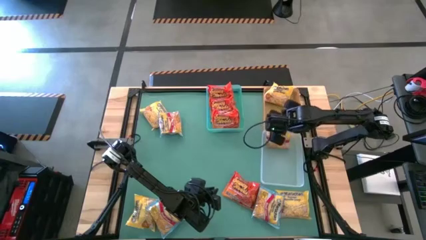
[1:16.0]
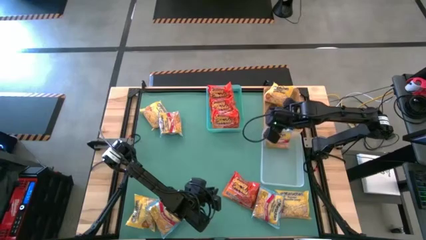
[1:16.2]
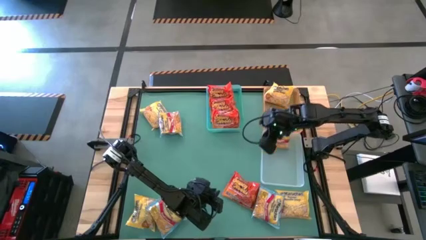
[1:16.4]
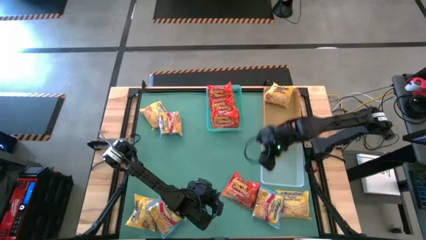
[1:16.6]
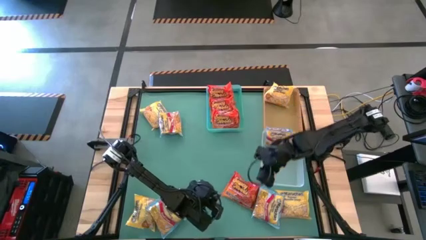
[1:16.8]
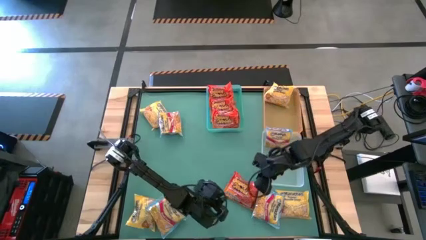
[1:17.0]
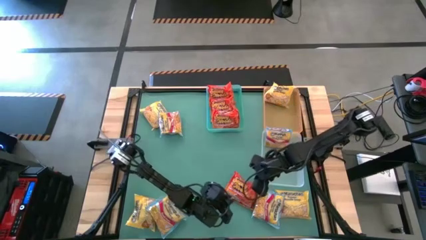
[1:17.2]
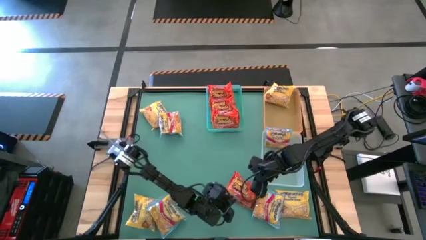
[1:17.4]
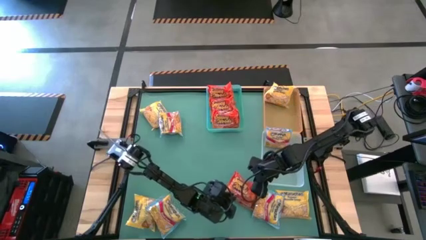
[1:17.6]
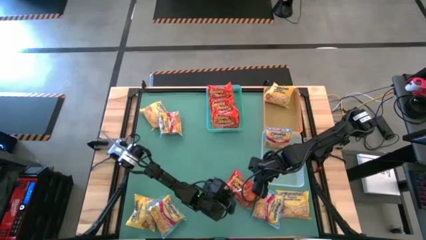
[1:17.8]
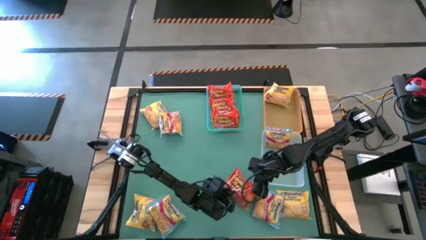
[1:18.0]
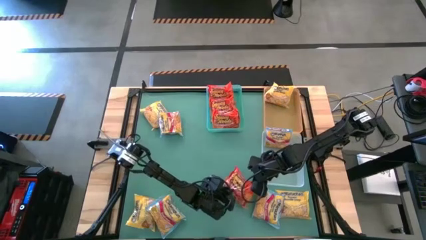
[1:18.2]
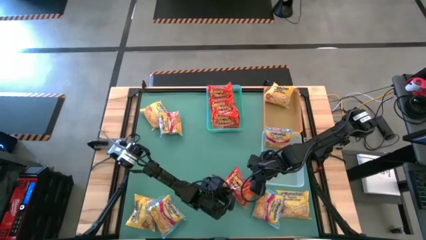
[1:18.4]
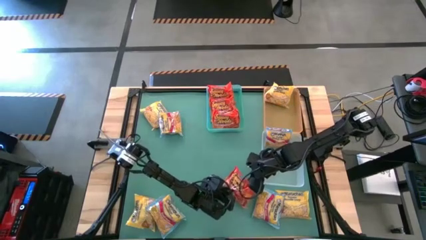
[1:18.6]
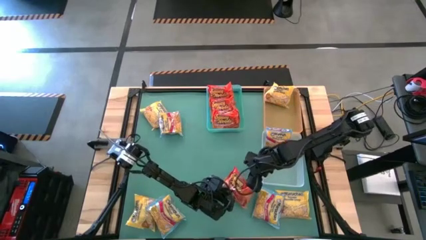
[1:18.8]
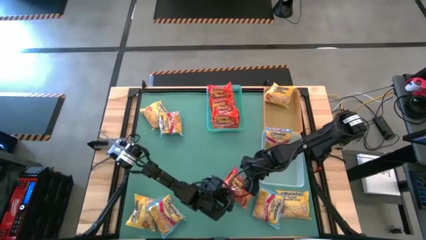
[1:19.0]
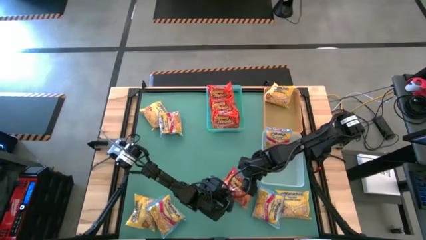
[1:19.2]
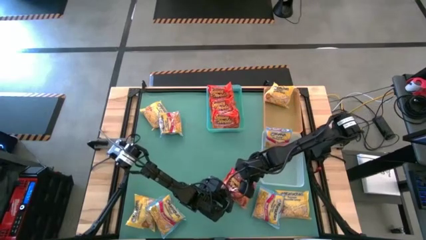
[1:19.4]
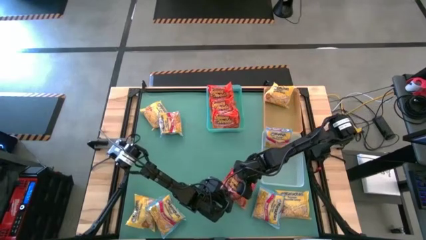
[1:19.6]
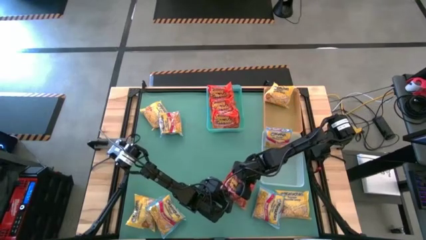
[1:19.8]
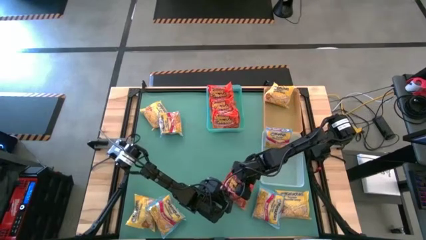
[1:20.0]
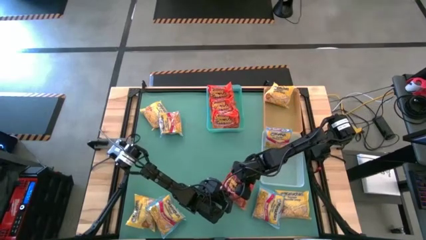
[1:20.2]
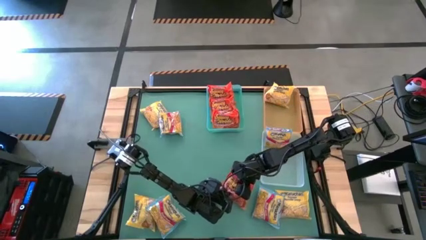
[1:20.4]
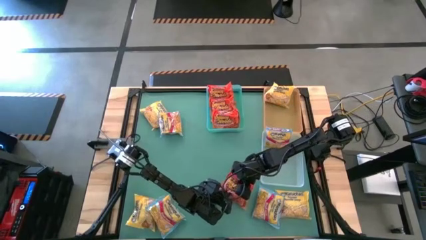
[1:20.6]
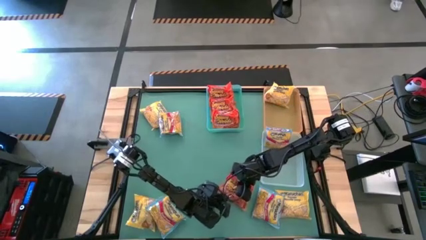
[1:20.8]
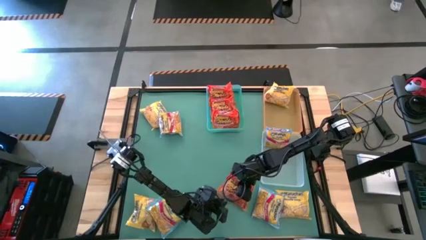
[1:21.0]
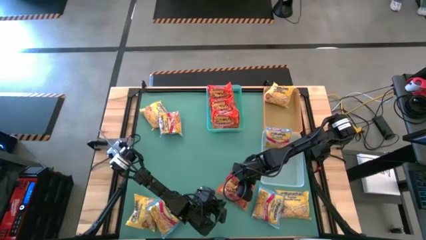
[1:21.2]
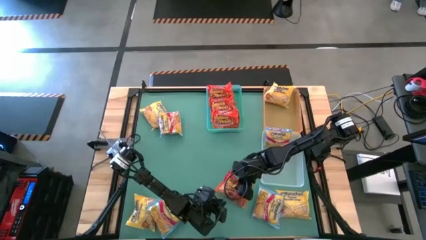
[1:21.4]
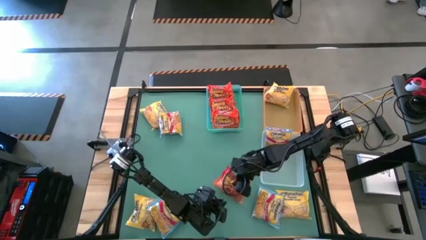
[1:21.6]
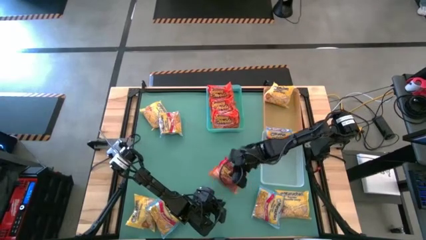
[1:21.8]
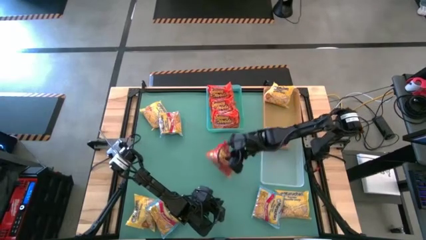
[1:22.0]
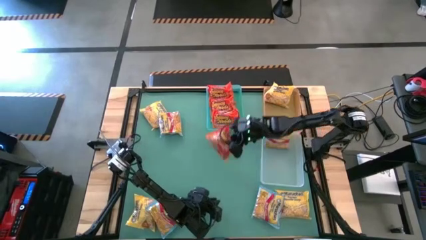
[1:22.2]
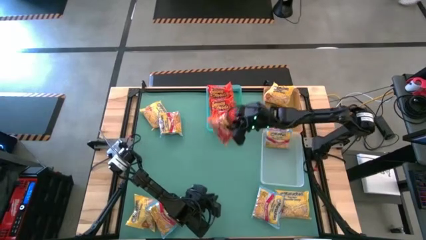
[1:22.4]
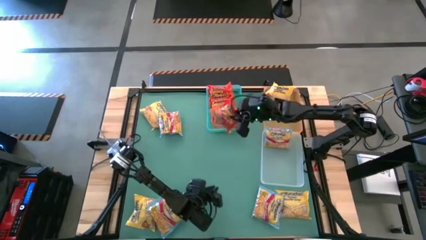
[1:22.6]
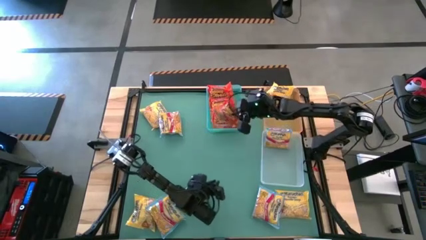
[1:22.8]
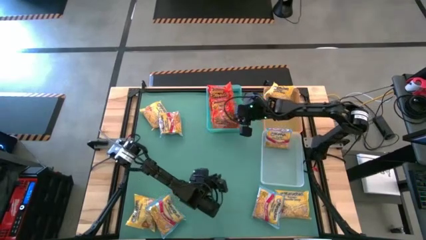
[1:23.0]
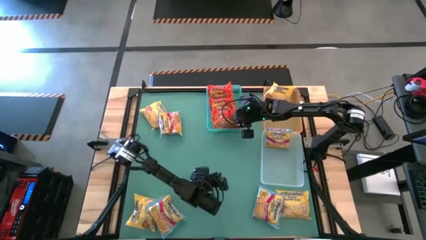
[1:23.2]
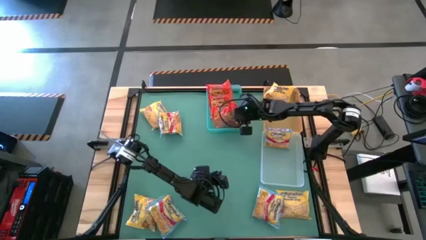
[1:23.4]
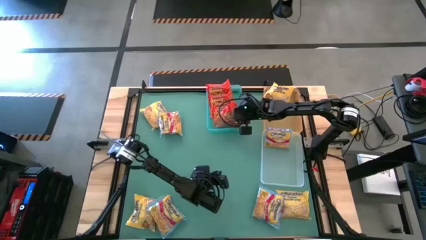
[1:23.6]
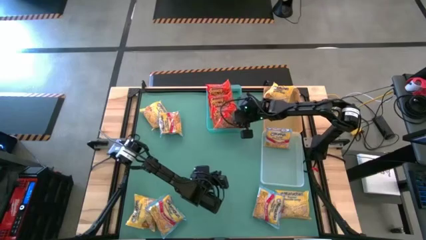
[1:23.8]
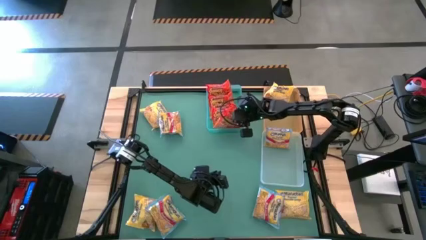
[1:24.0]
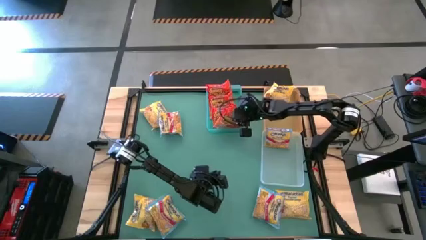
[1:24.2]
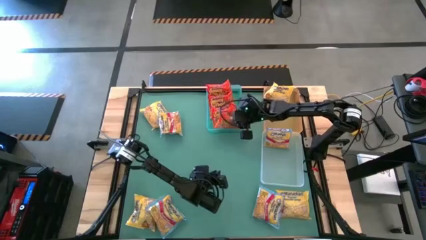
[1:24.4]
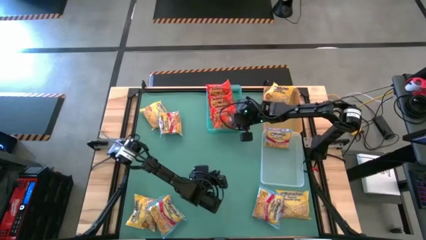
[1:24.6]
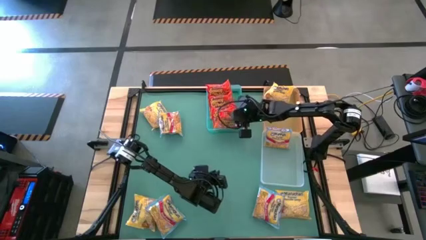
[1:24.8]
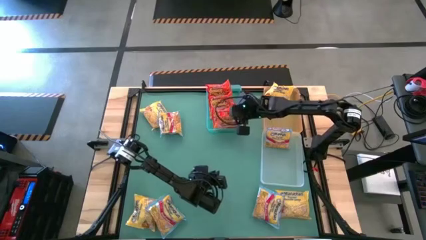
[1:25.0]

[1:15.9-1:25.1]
Task: Sort Maruchan noodles
Put the orange noodle pack into the green bin

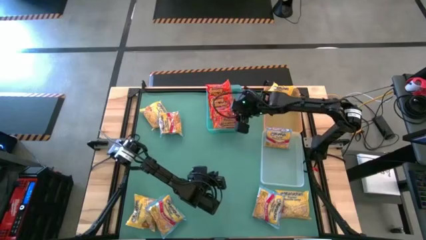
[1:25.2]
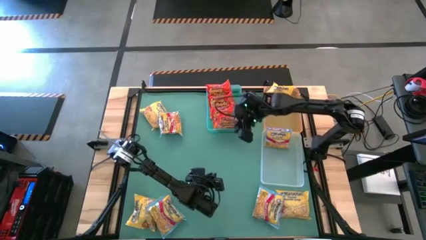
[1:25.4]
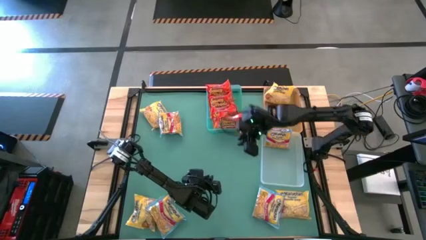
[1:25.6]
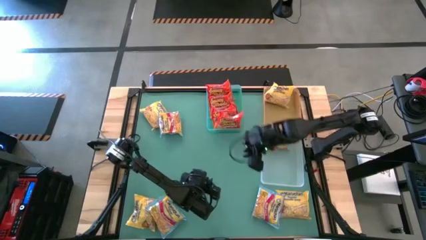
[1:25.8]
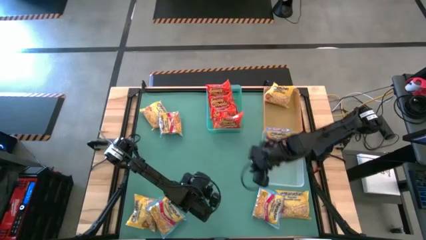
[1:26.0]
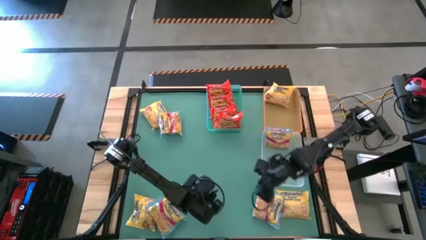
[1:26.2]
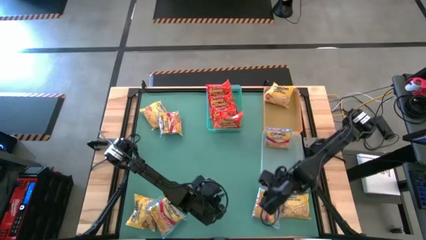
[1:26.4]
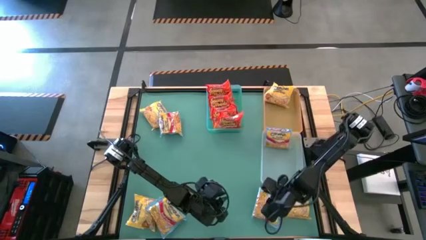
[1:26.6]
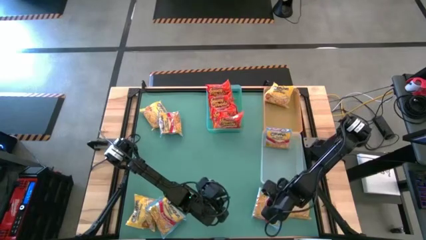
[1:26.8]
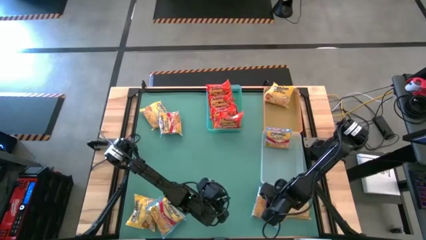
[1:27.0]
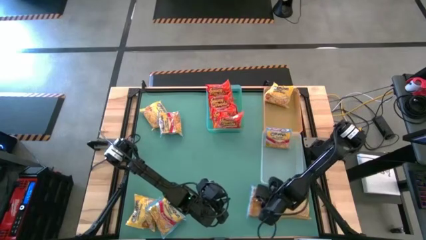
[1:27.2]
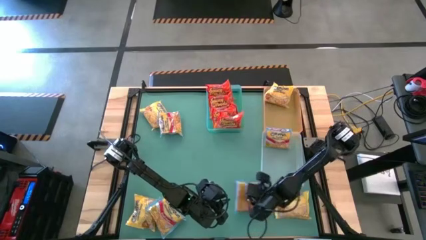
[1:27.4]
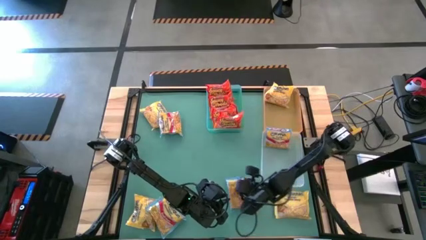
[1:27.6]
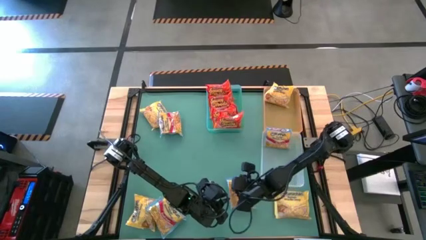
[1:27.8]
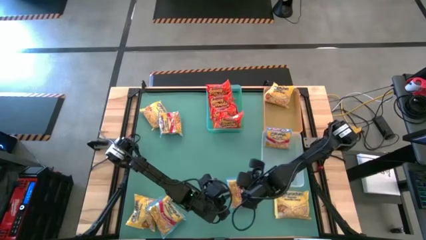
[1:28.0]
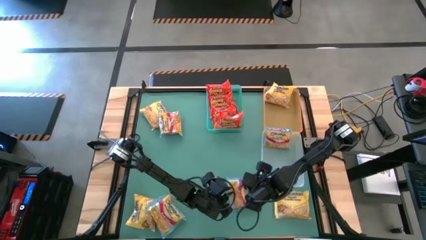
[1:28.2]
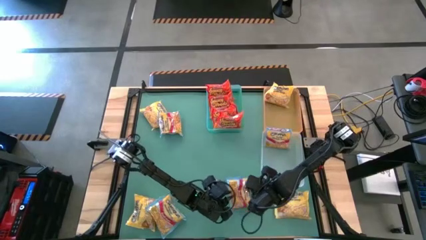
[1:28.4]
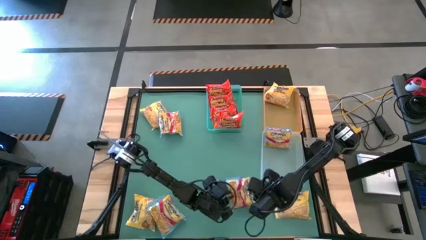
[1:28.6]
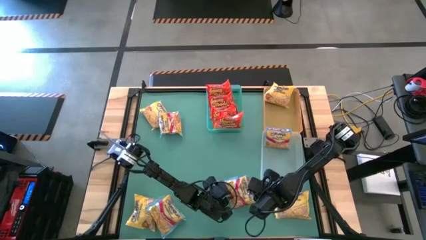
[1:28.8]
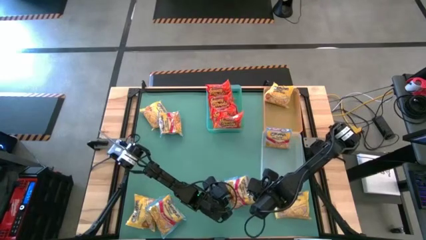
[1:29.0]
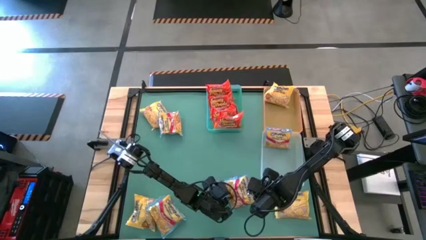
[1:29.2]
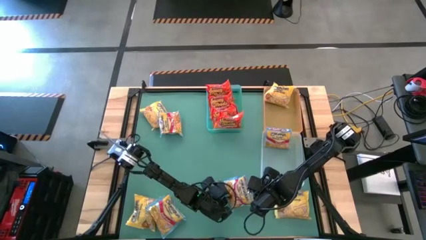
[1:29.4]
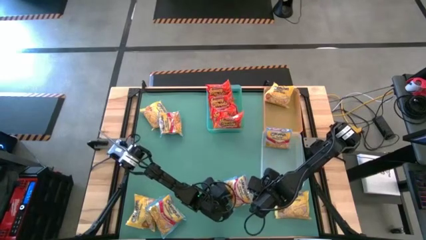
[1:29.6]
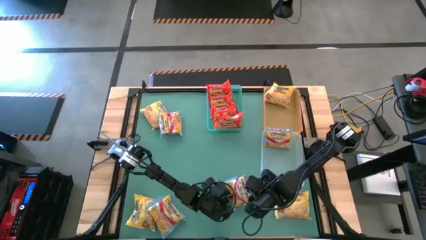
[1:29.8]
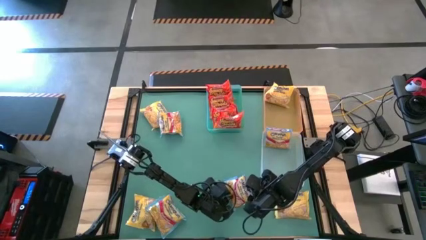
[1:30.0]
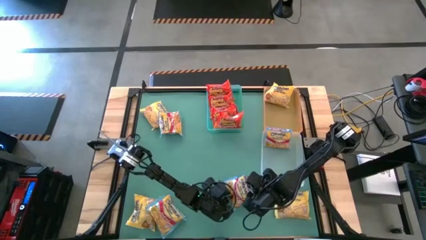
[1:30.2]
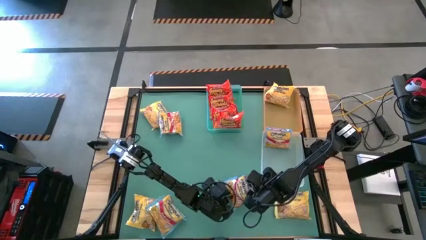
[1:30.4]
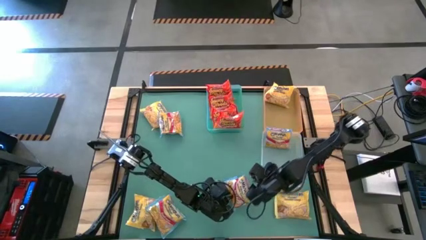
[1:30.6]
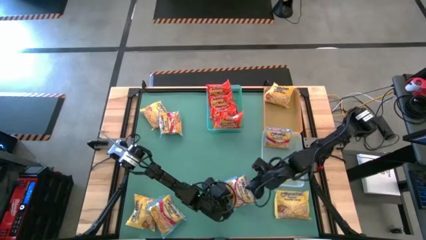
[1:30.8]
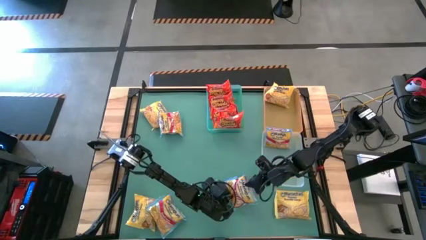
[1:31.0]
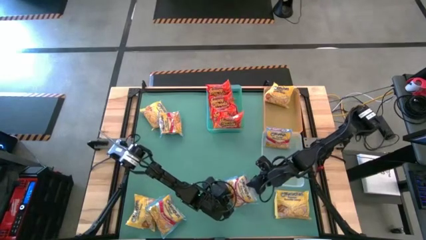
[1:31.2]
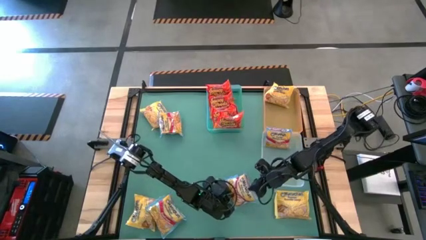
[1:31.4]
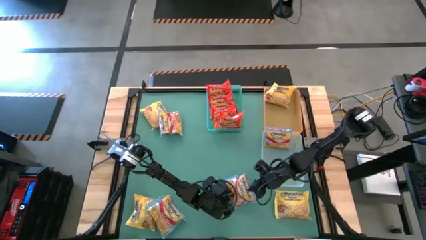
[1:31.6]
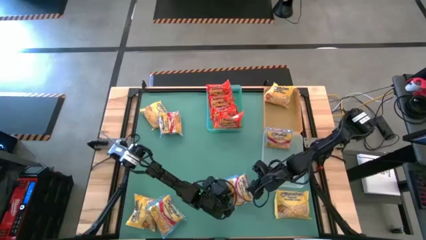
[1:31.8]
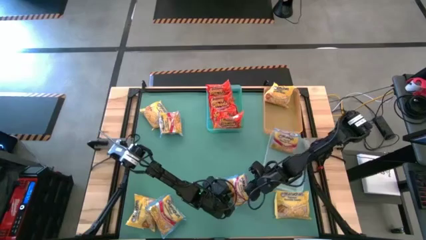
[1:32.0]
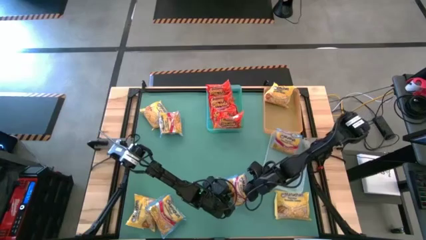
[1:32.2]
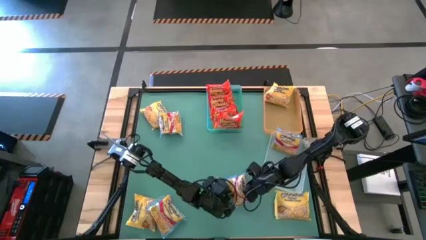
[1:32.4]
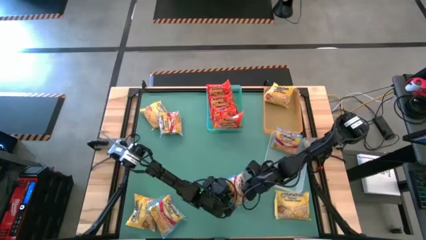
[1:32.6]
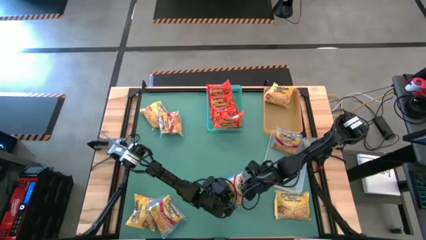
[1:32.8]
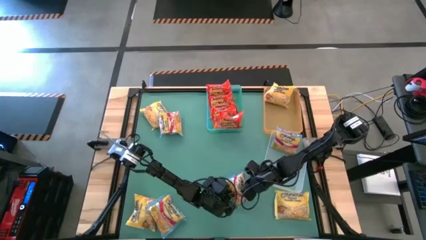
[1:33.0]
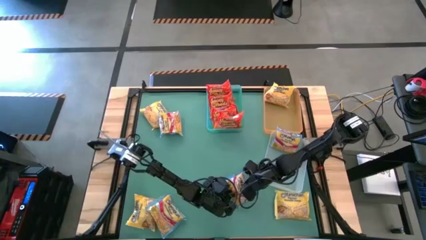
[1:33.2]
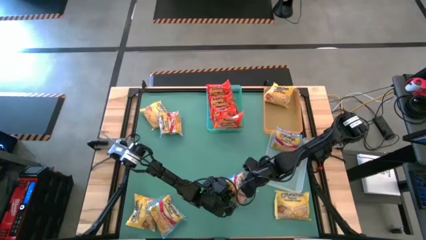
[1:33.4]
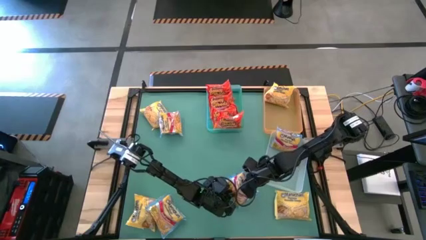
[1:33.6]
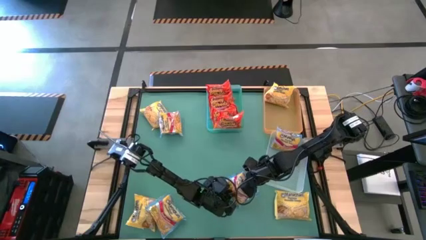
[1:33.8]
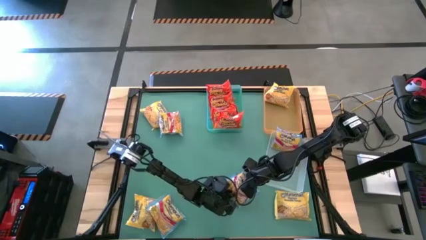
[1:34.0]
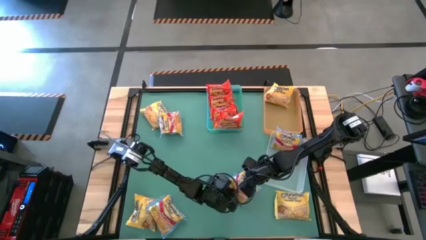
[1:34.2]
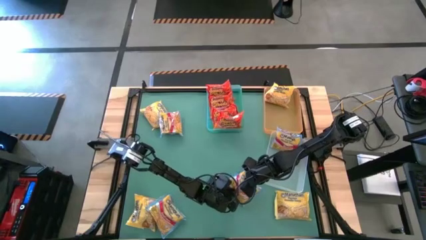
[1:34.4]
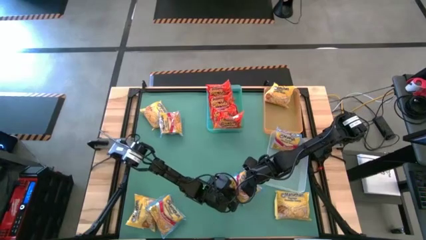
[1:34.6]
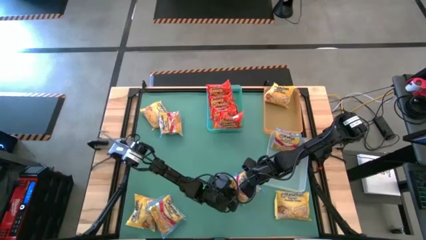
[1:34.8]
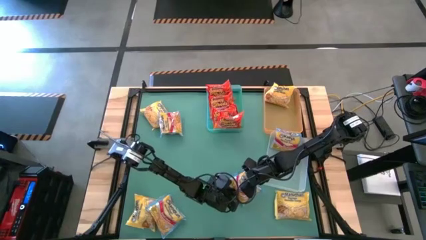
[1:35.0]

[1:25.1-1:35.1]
Put the blue noodle pack into the transparent bin
